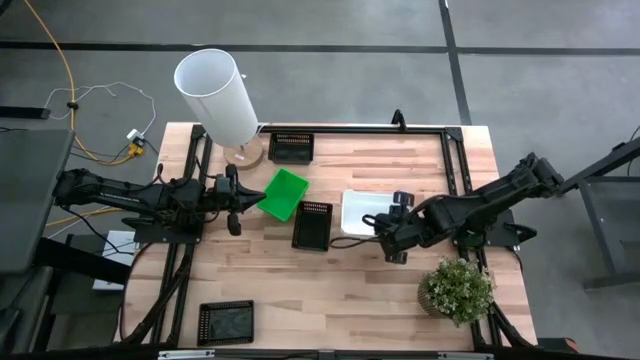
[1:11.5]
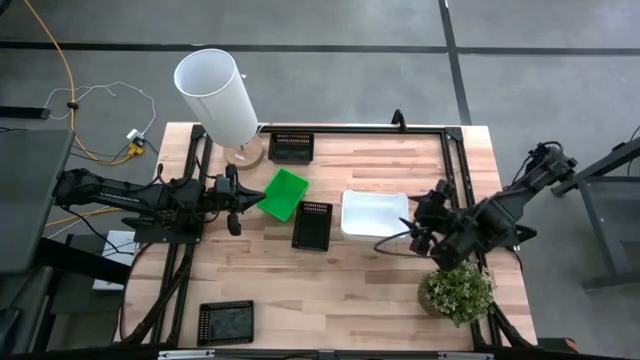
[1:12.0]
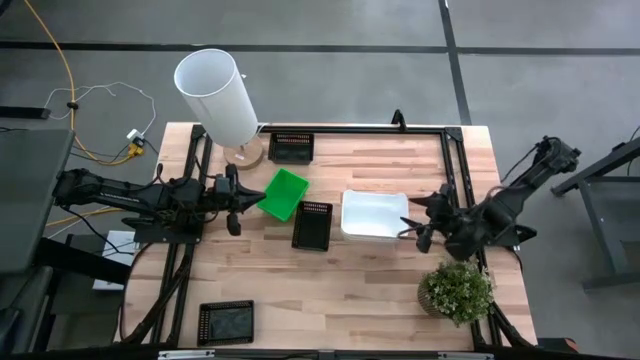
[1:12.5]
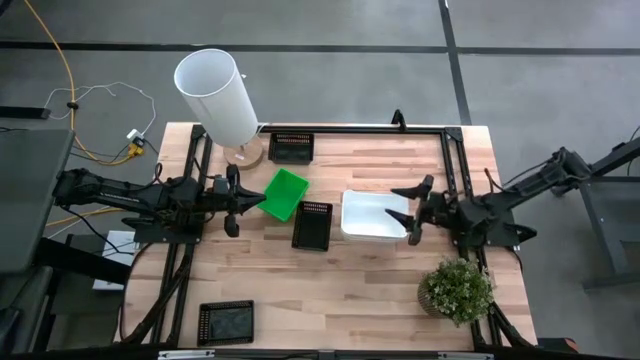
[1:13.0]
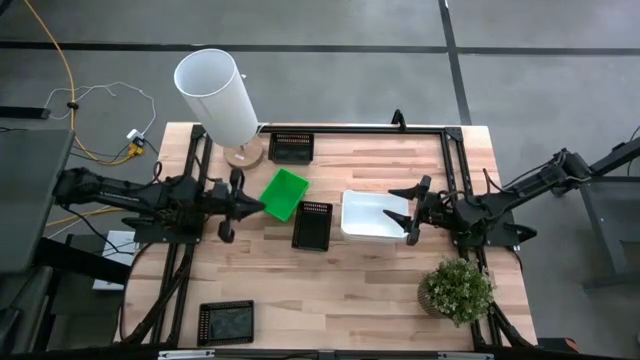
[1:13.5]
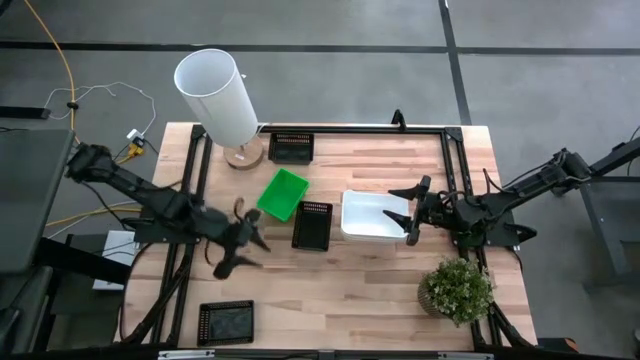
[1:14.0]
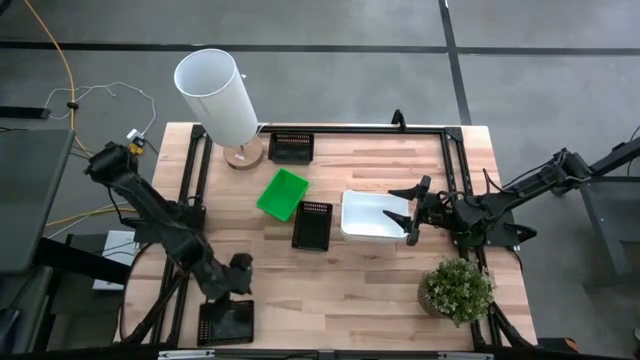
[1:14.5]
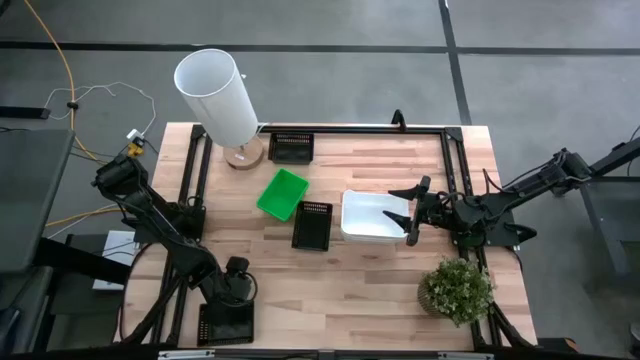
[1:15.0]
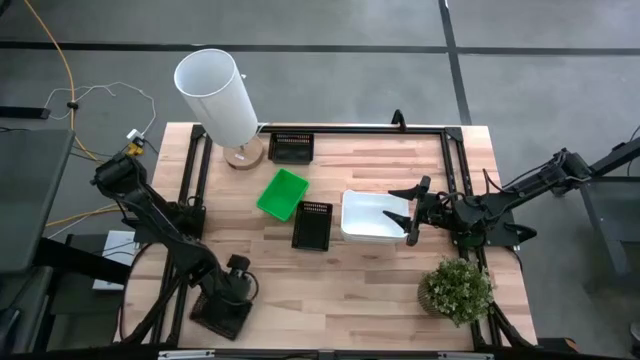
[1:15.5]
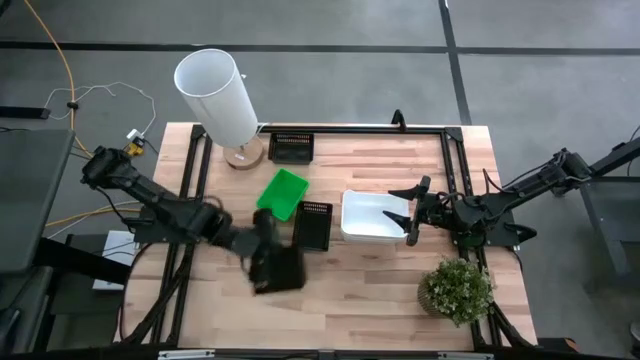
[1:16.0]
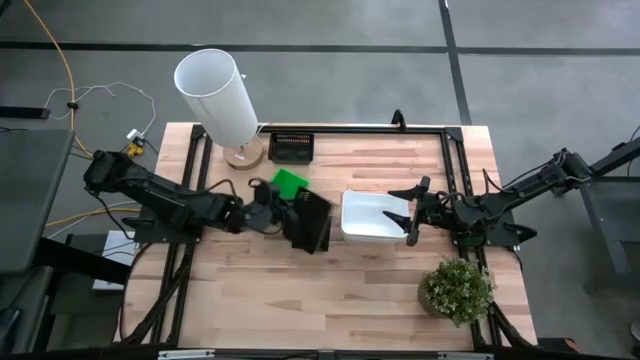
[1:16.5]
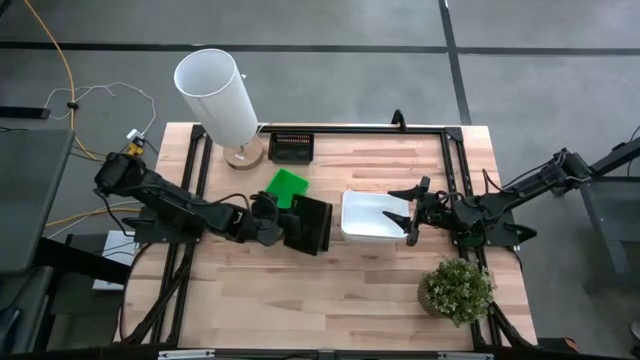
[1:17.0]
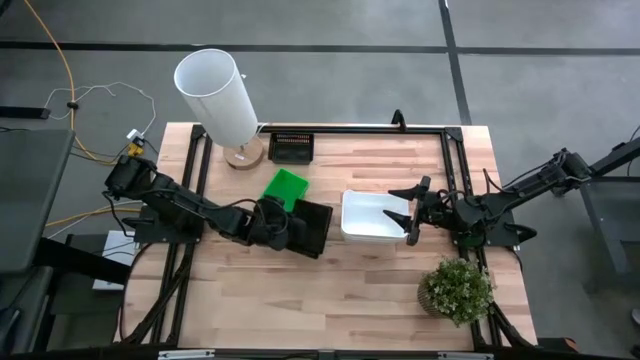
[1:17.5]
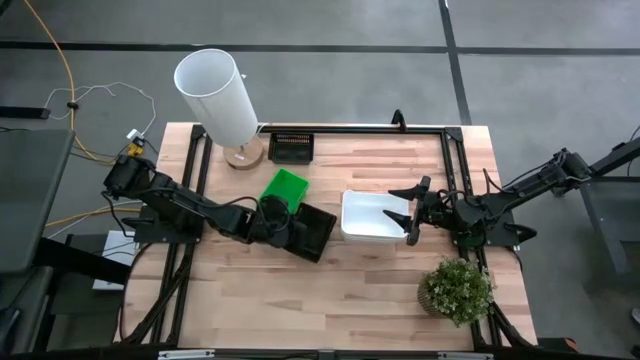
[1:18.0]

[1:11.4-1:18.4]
Stack the bottom black bin on the middle black bin

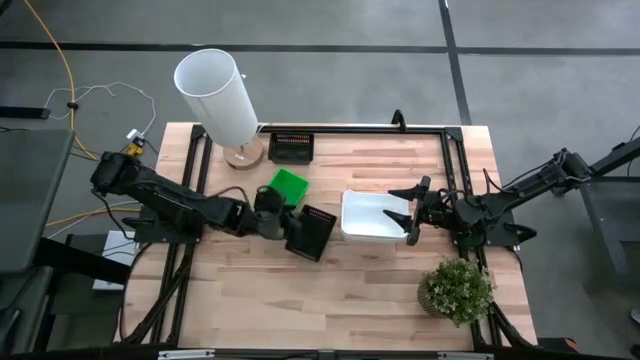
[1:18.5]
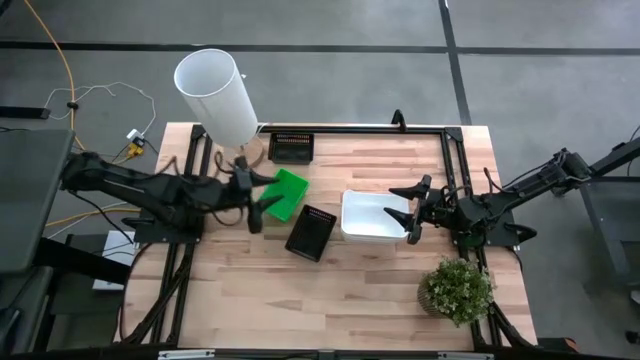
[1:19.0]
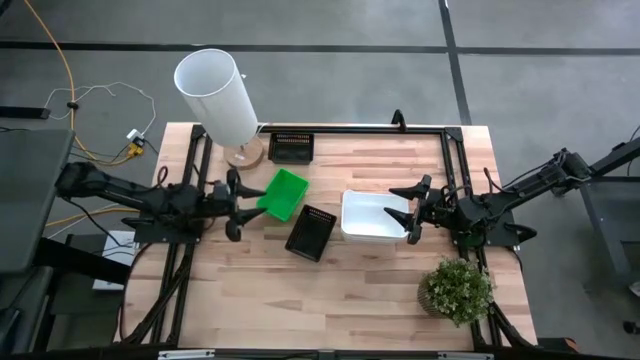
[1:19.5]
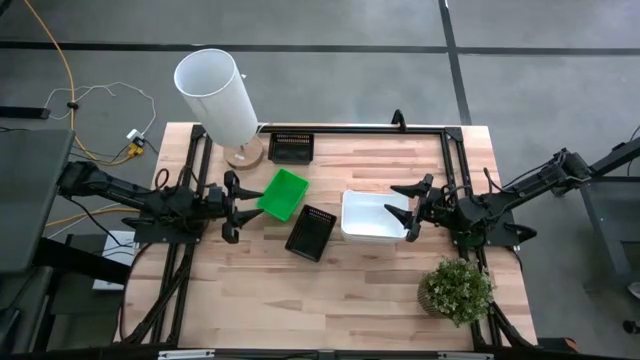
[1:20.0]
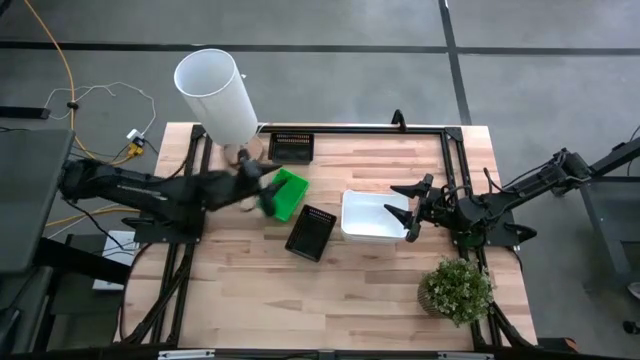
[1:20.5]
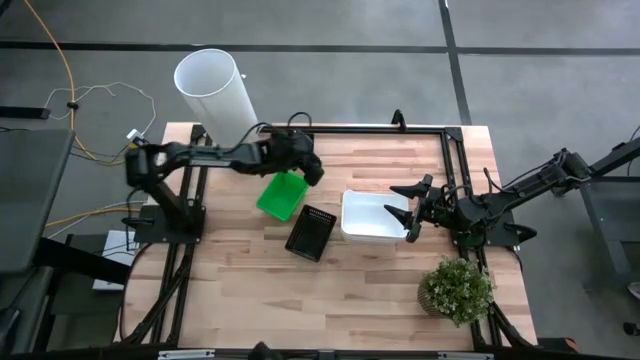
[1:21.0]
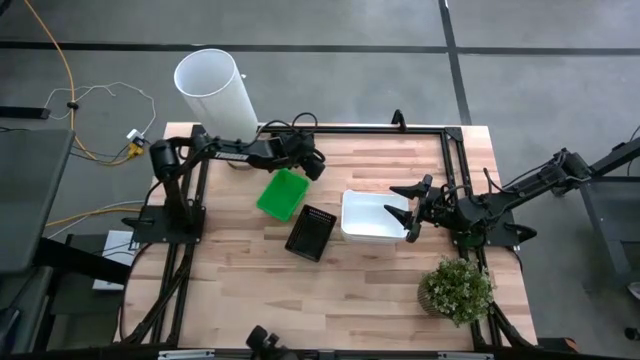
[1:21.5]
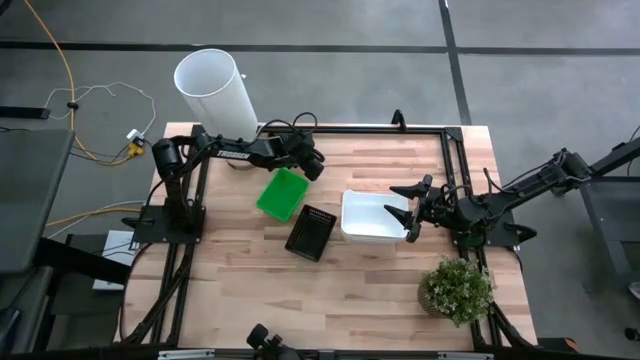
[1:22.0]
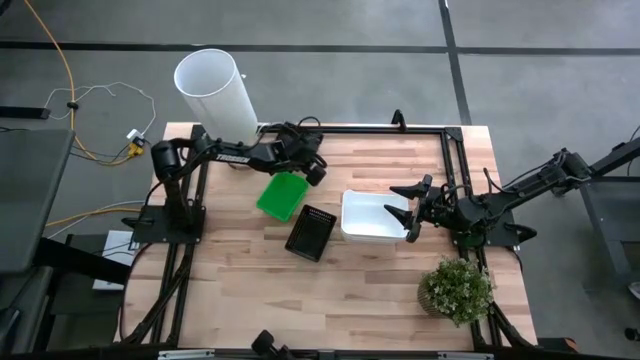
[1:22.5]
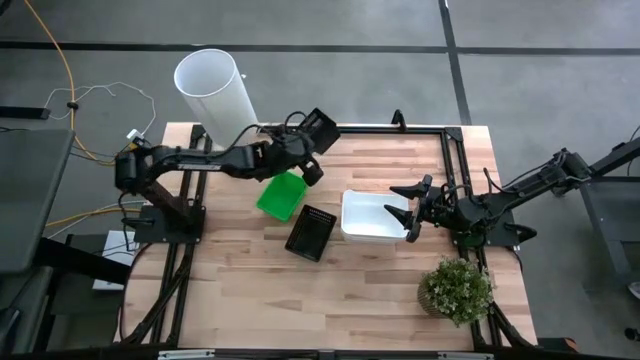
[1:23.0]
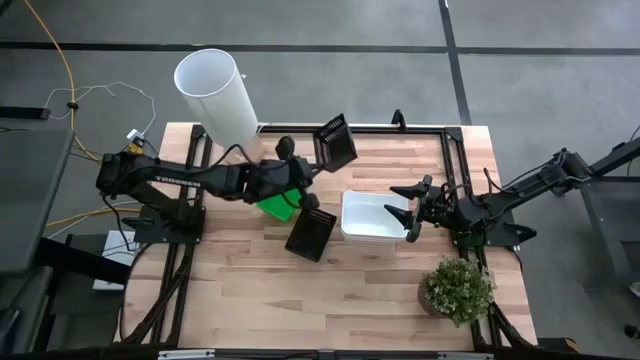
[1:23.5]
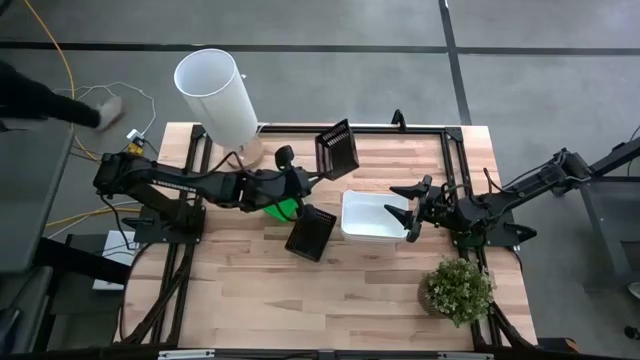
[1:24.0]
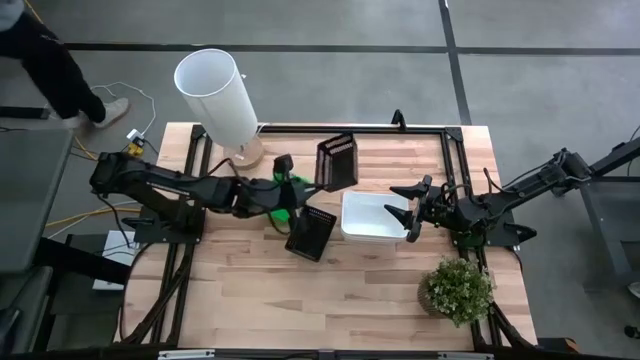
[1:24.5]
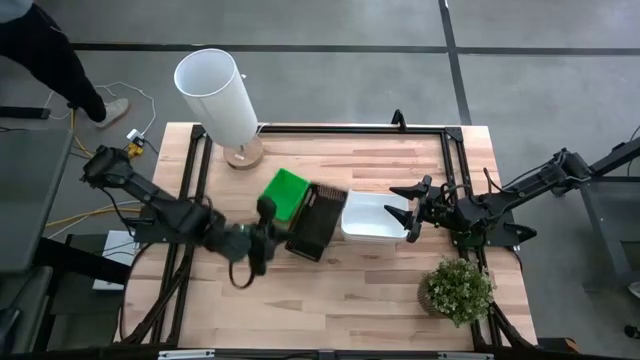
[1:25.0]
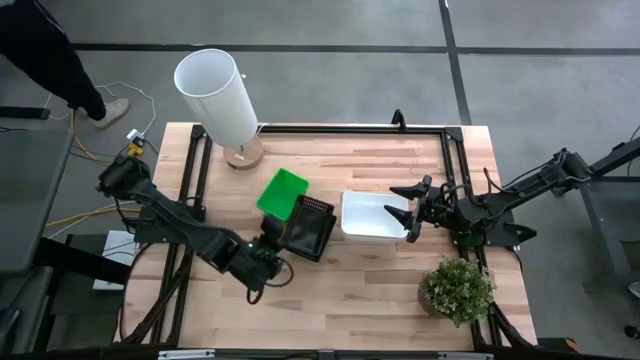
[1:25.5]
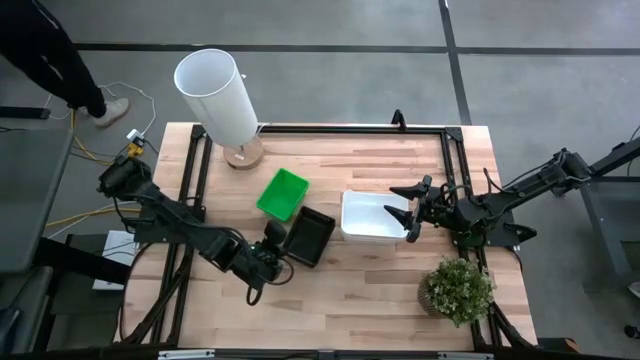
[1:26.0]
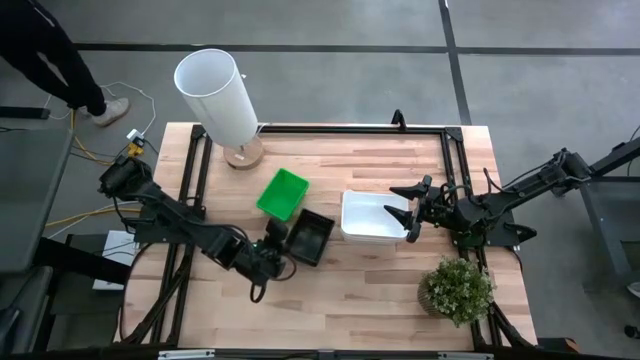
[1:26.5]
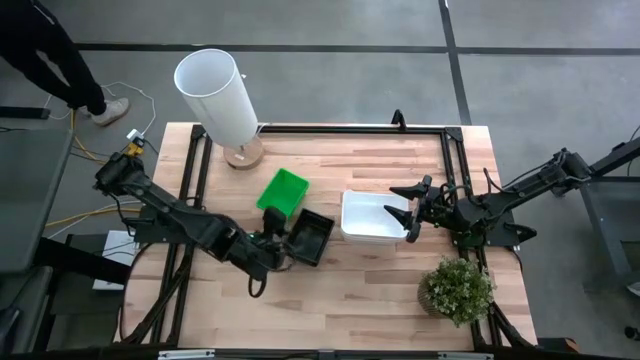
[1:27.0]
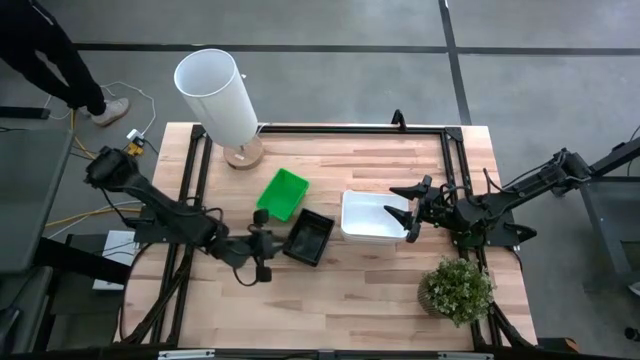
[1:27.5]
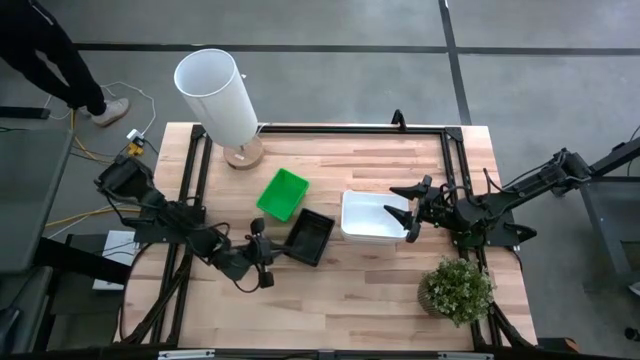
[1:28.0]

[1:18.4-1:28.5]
Stack the top black bin on the bottom black bin
